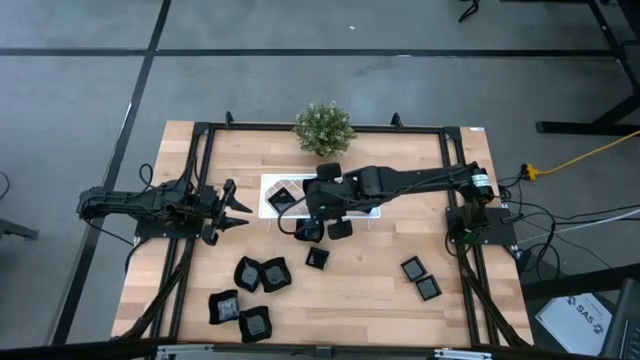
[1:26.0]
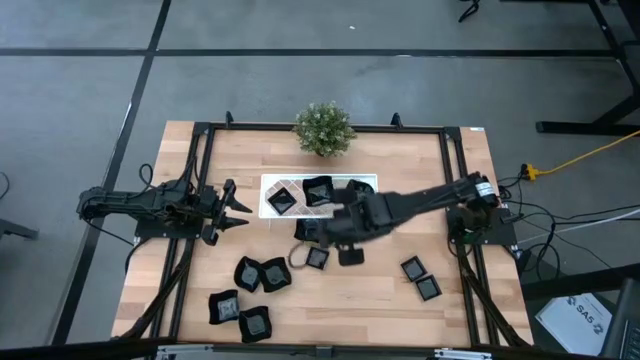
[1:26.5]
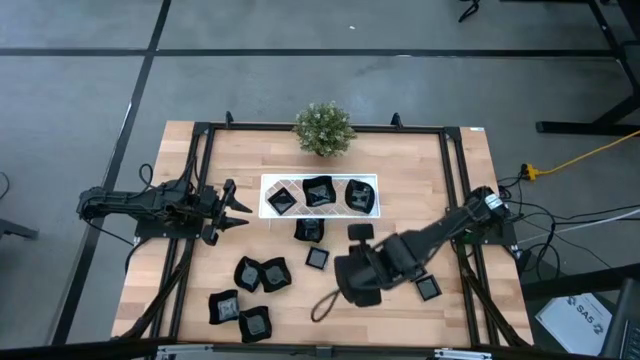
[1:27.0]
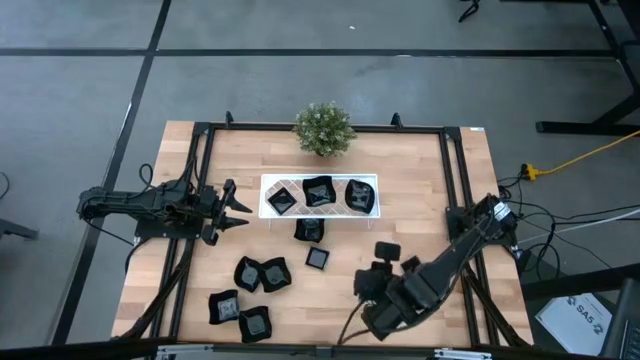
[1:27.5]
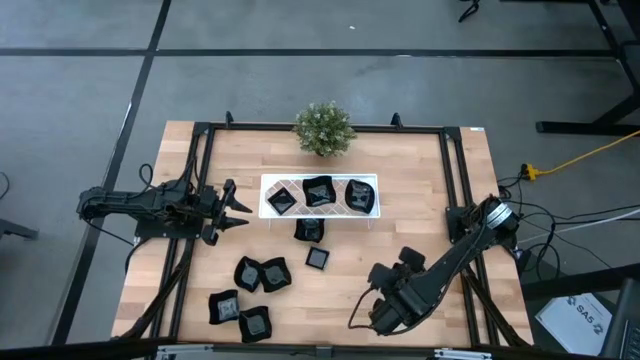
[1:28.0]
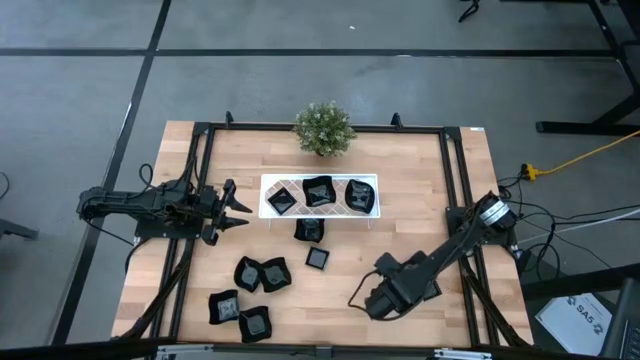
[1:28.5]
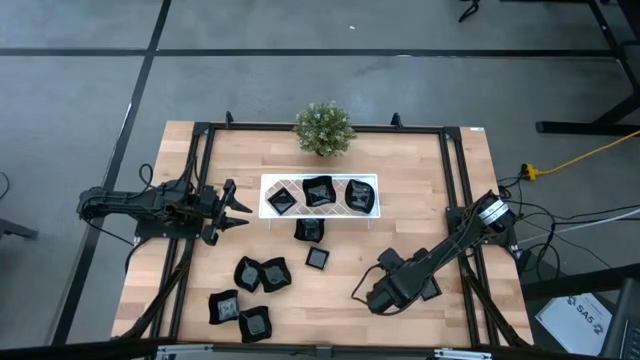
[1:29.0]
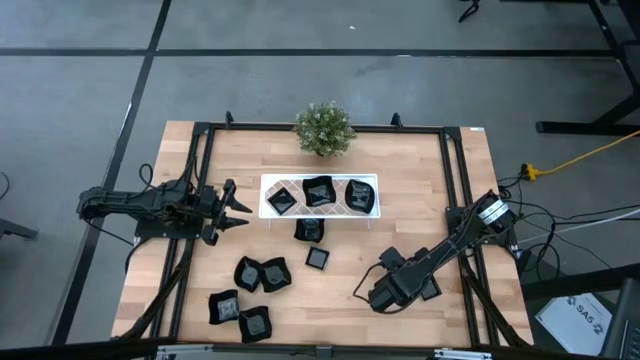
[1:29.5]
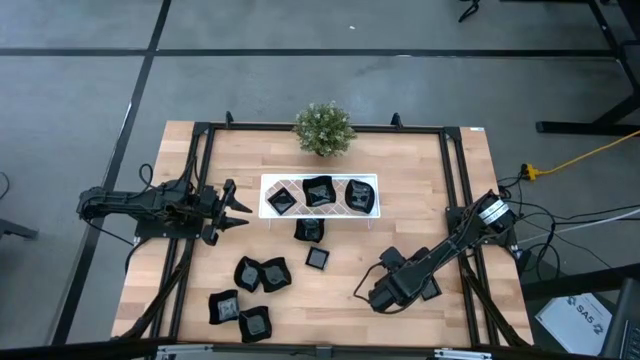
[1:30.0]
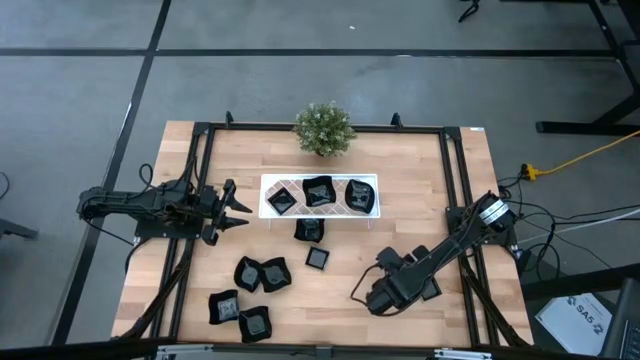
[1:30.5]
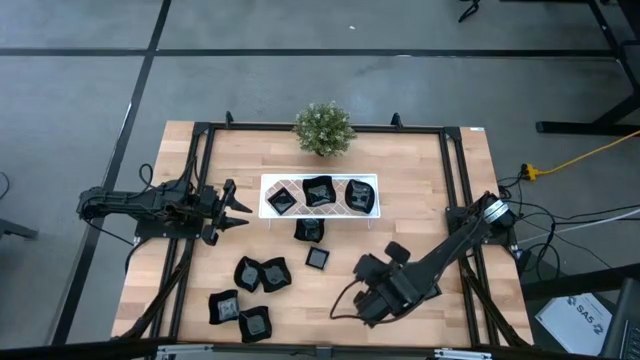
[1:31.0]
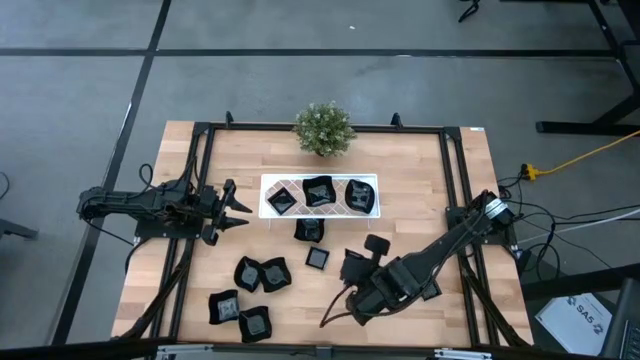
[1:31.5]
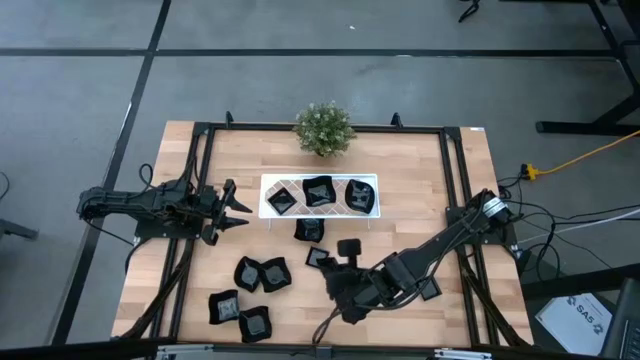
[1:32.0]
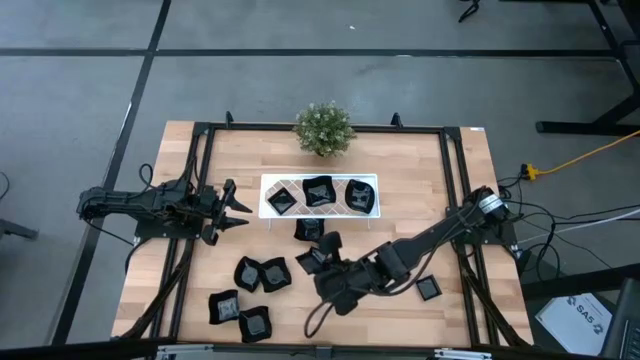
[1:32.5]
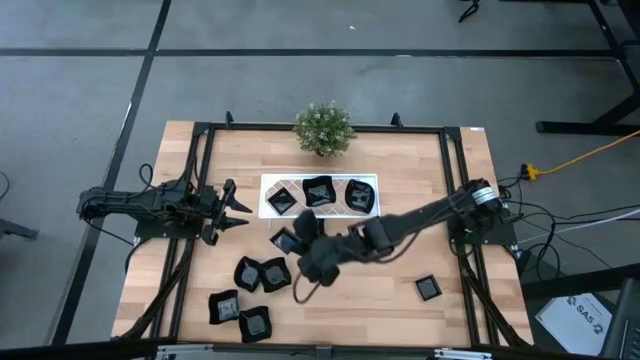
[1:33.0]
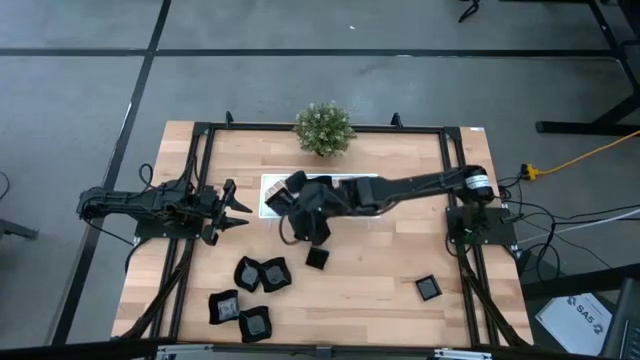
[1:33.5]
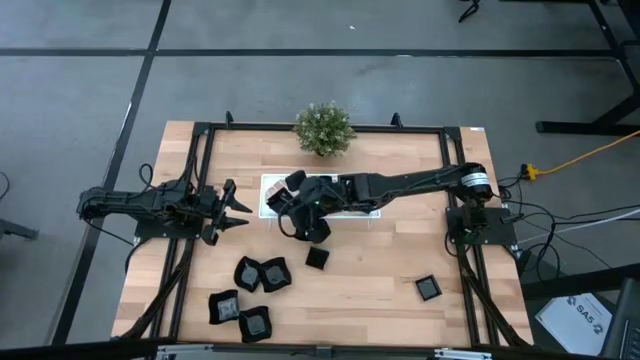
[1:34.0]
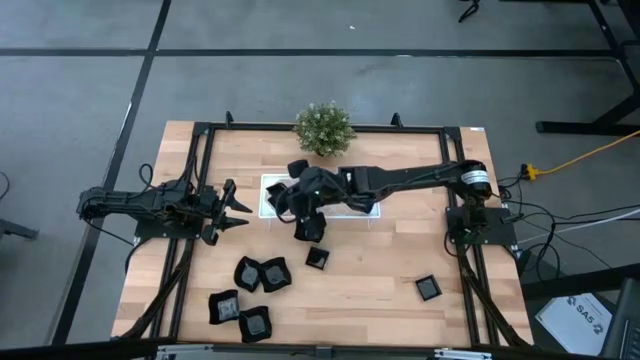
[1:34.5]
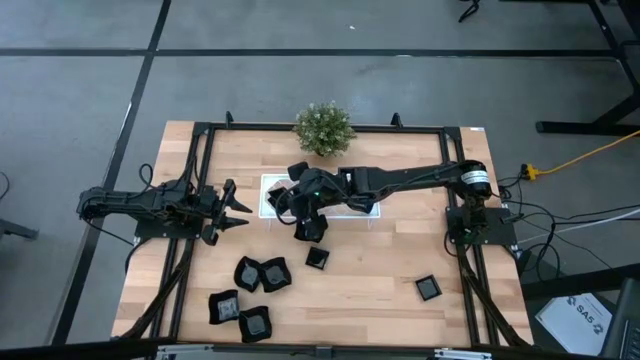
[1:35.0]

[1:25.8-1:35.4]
Task: Pick & Place Mini shaped plates
Stack the black square plate on top of the black square plate on the shelf

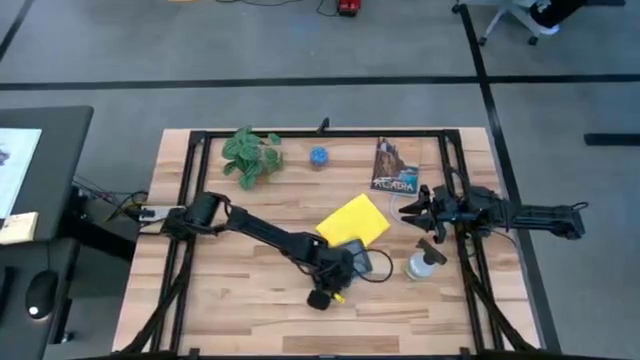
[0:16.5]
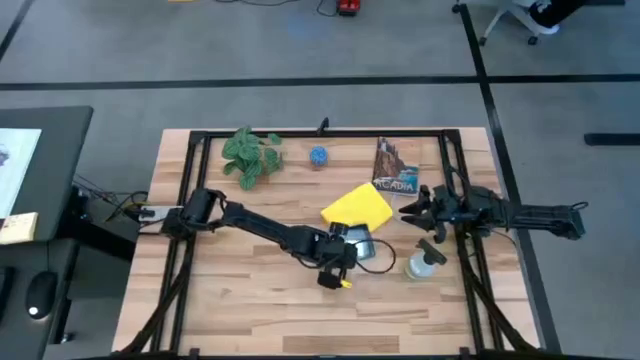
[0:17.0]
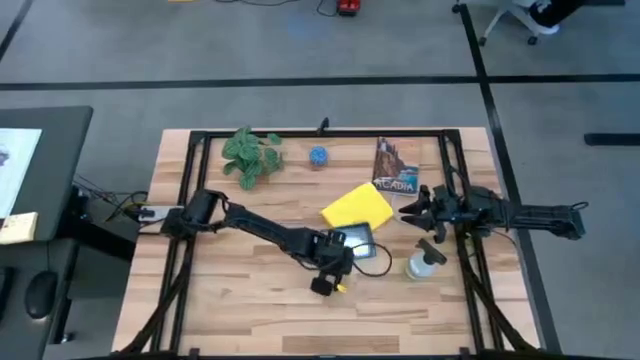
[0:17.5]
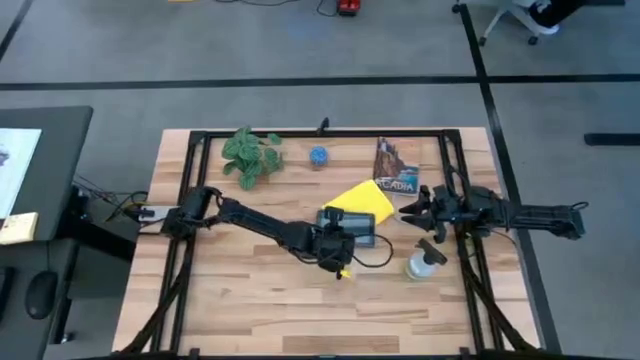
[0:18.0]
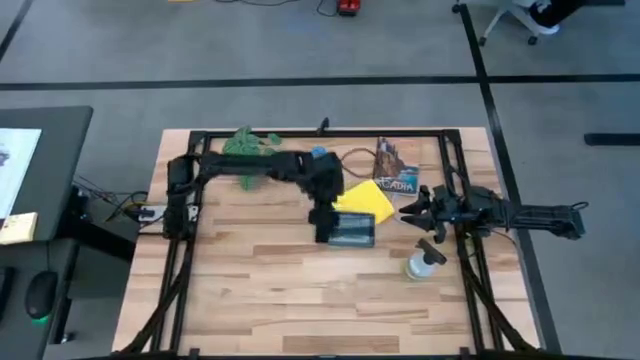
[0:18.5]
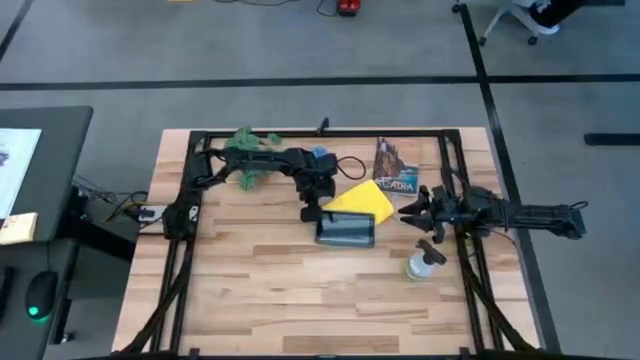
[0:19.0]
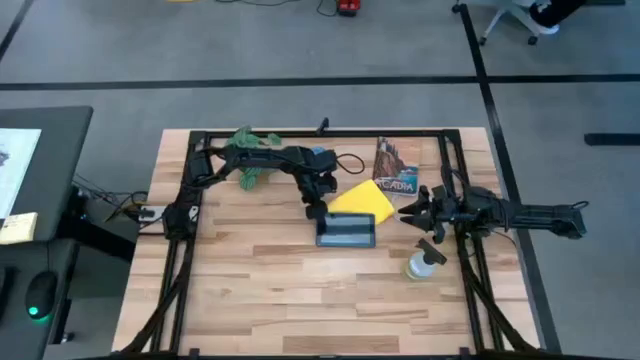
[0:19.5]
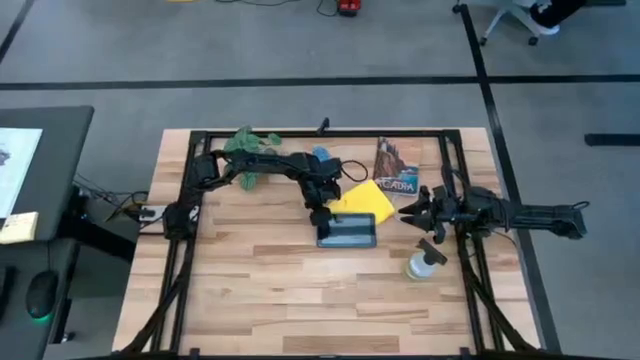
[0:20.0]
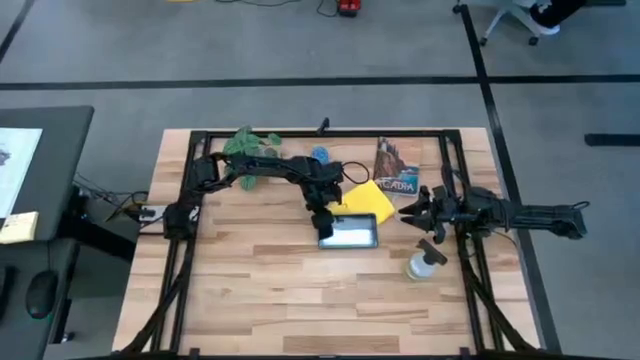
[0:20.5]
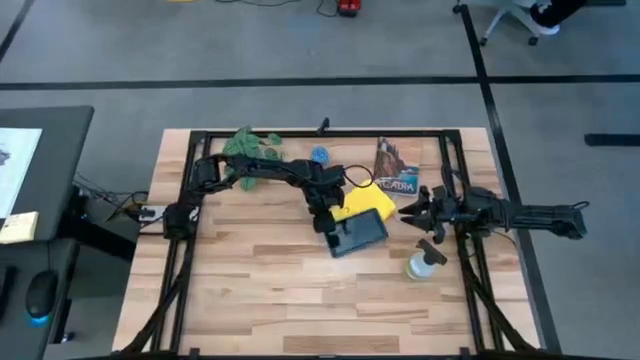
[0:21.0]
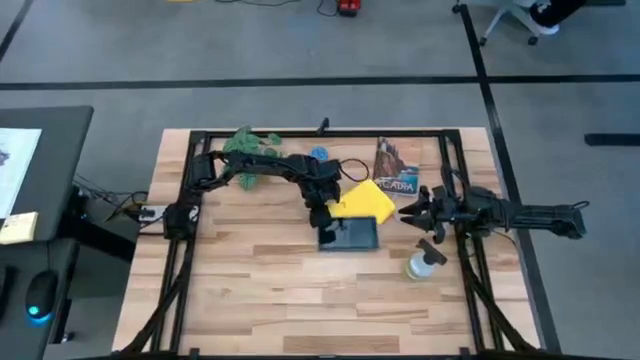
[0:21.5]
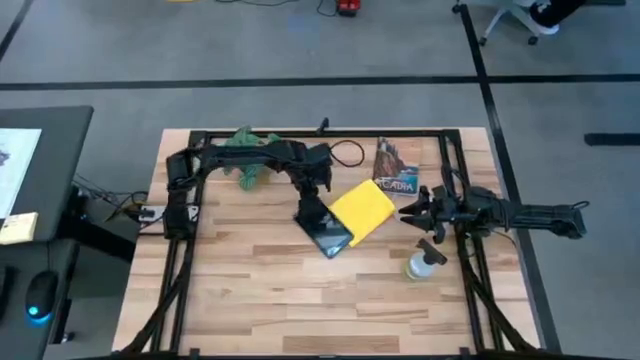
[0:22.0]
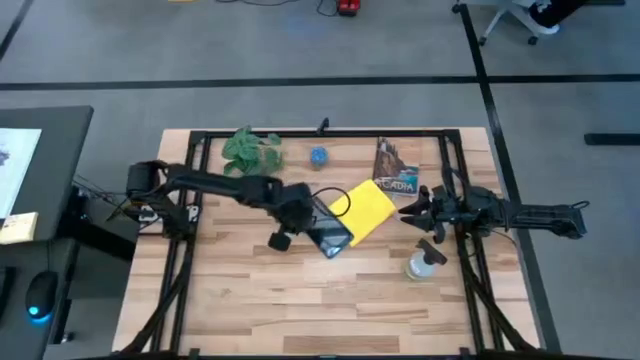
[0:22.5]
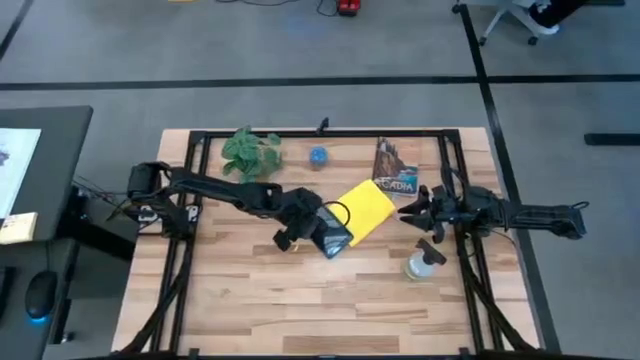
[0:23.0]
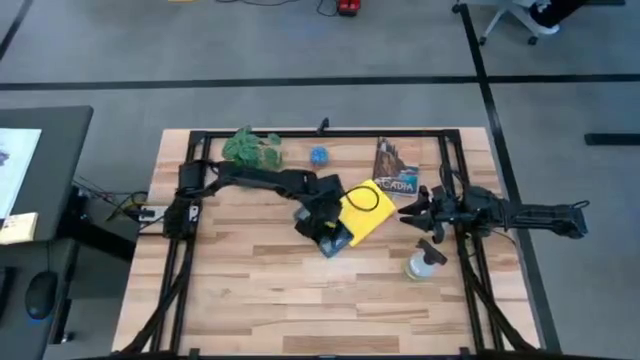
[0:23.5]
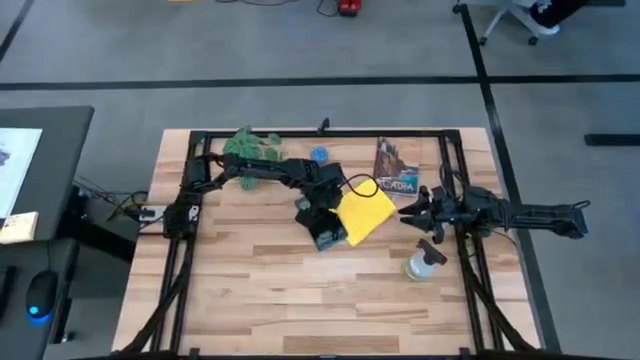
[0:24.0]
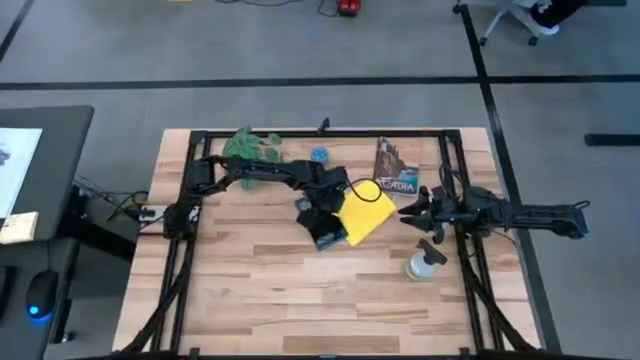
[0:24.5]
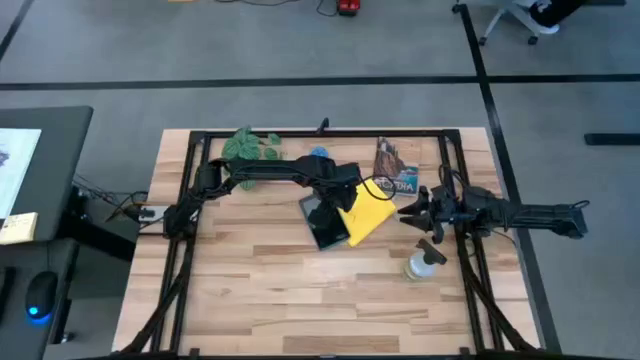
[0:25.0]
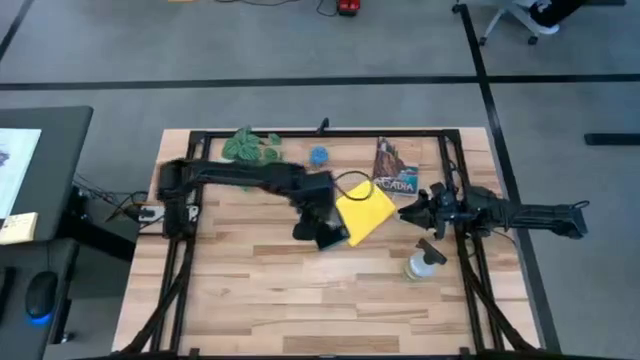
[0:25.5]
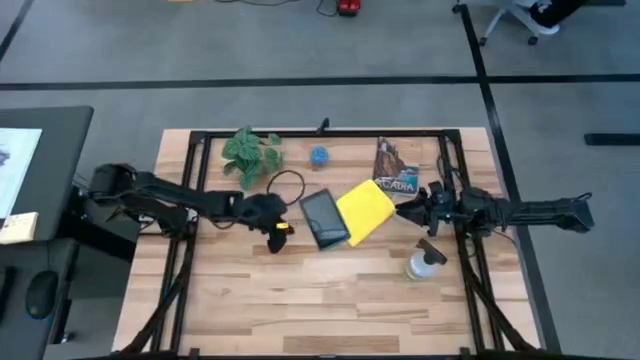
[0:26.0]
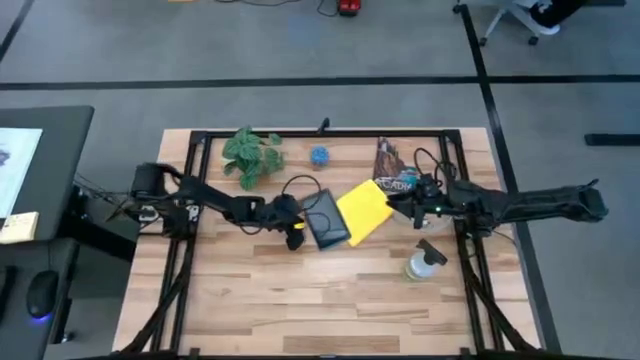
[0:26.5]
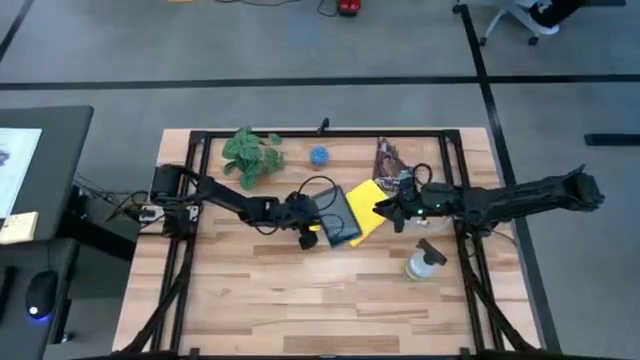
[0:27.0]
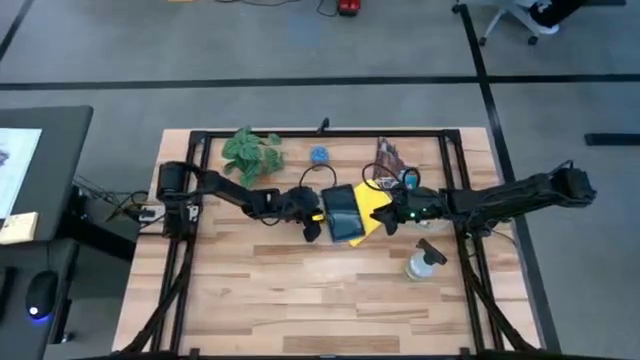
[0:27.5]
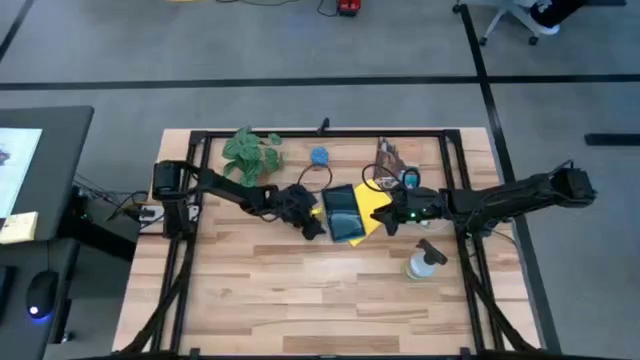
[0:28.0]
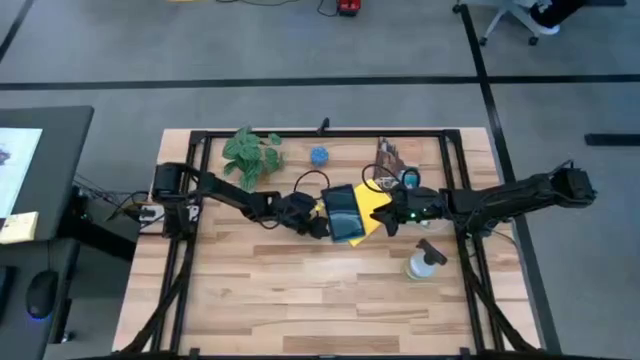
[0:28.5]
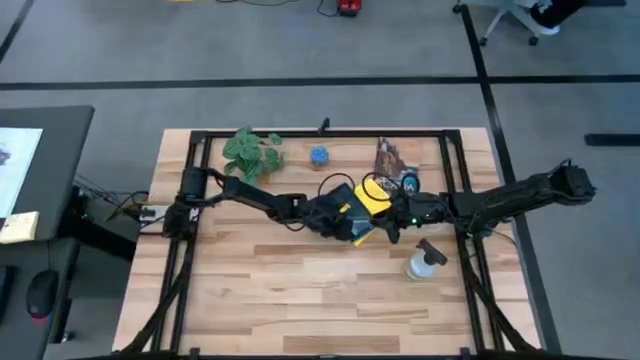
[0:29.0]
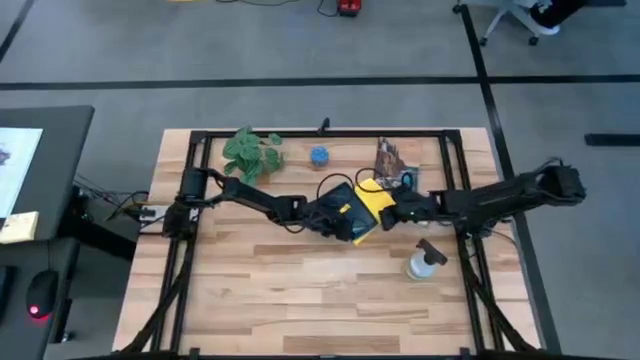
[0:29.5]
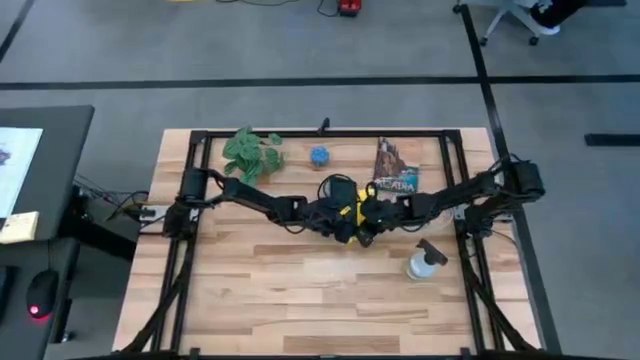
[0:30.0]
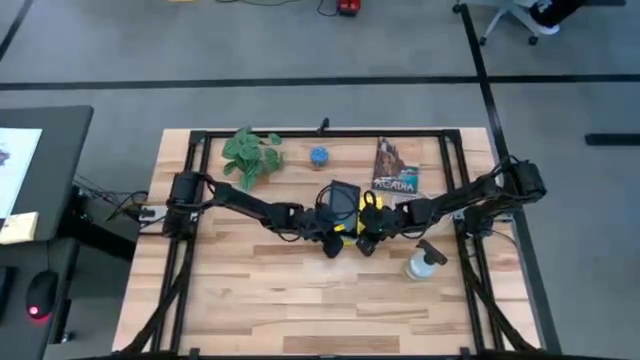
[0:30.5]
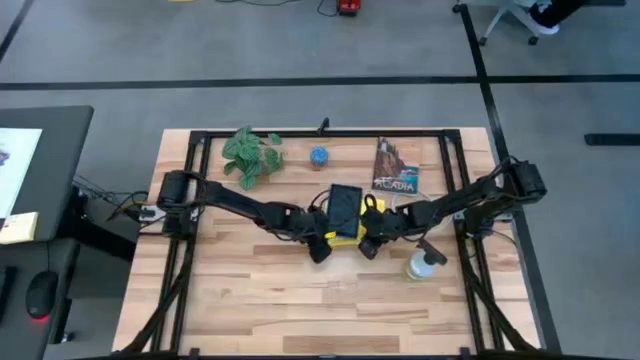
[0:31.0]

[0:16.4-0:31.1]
Task: Apply microfiber cloth
Prepare the blue tablet
